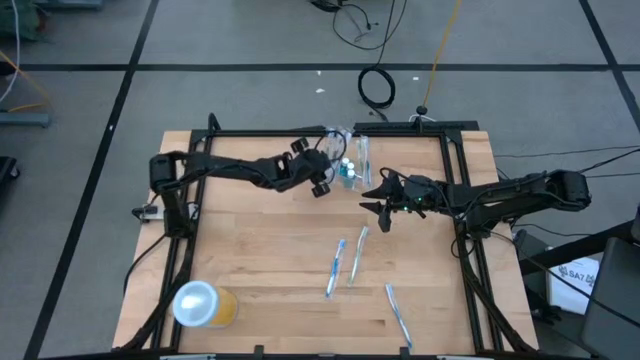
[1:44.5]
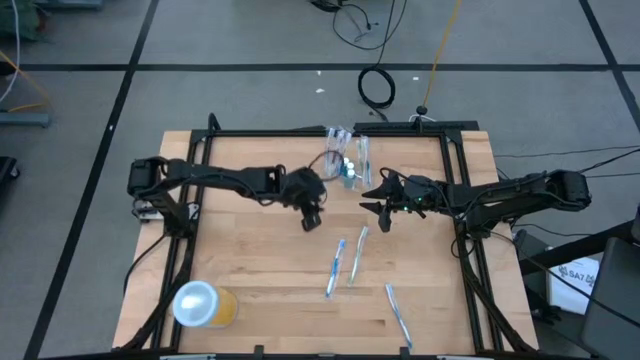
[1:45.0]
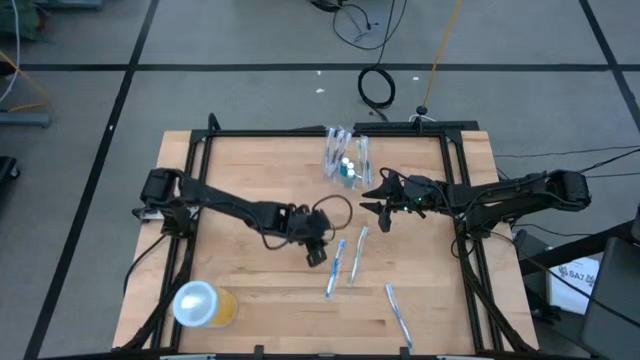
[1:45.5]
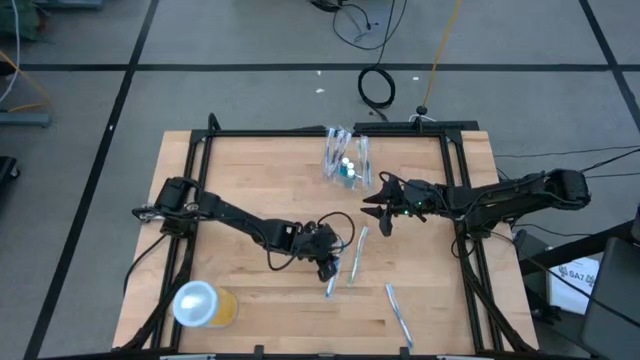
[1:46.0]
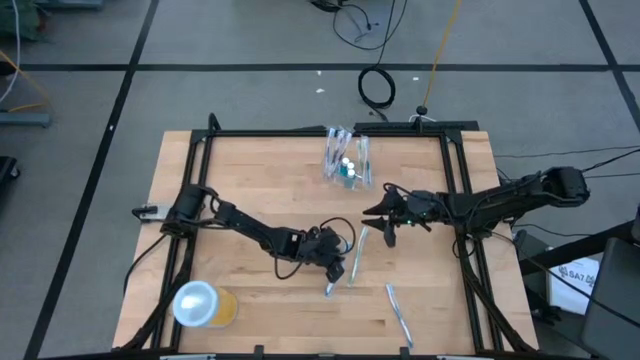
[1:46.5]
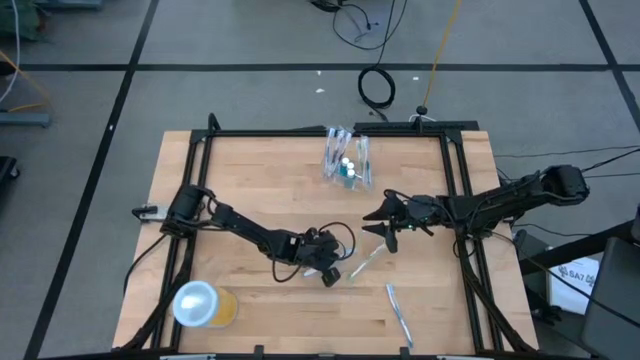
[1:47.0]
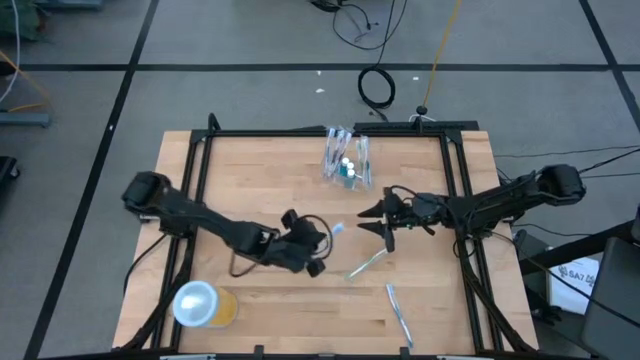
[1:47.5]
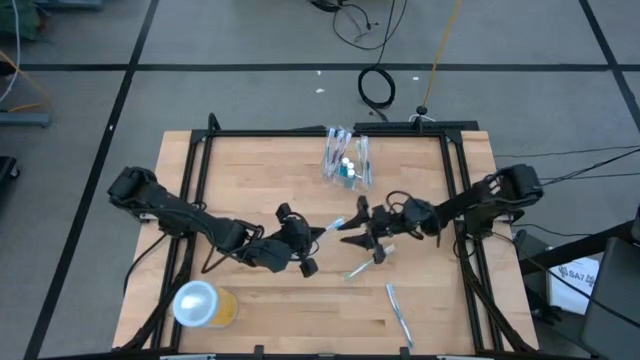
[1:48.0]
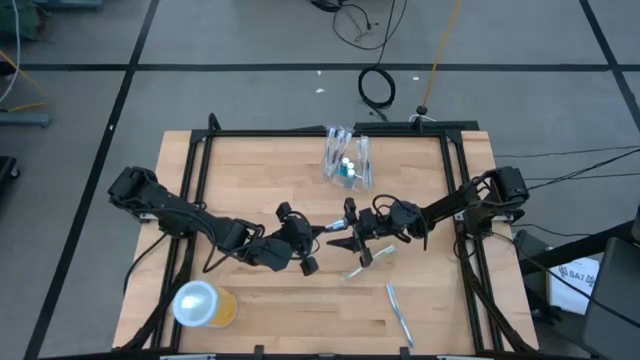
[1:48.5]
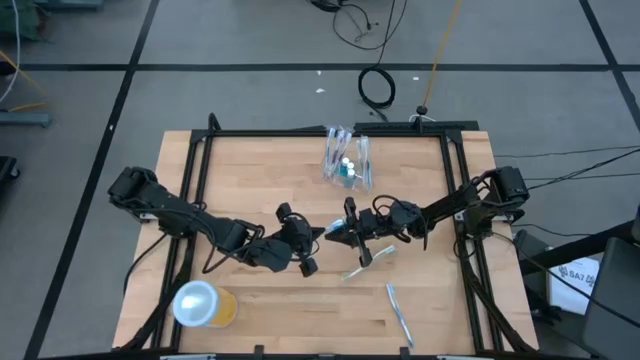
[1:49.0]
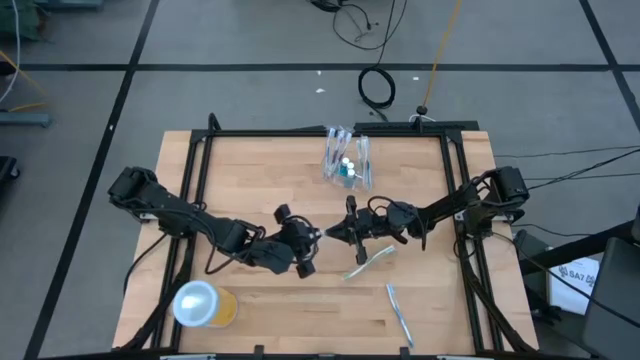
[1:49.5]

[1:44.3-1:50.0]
Task: Pick & Place toothbrushing station
Put the blue toothbrush into the transparent organizer

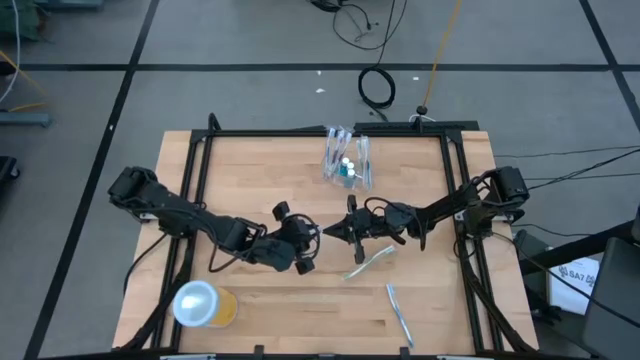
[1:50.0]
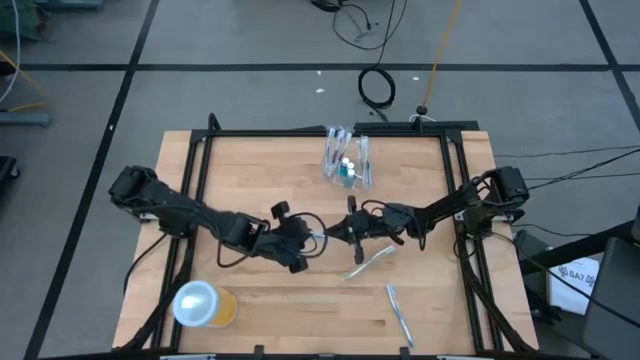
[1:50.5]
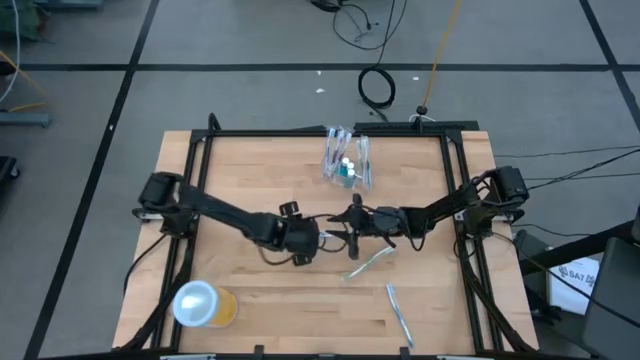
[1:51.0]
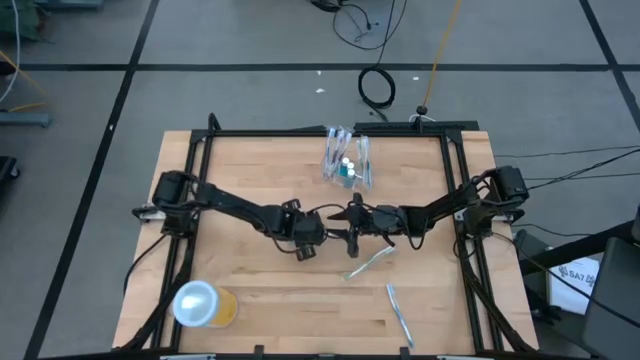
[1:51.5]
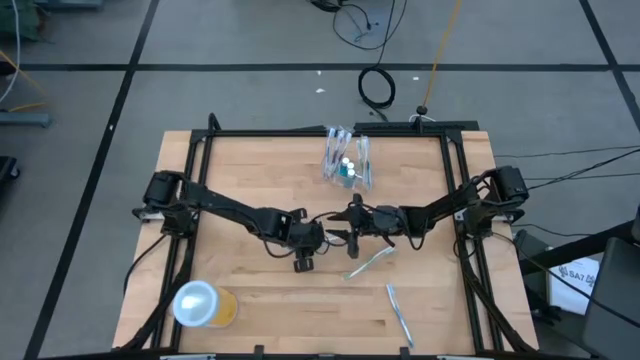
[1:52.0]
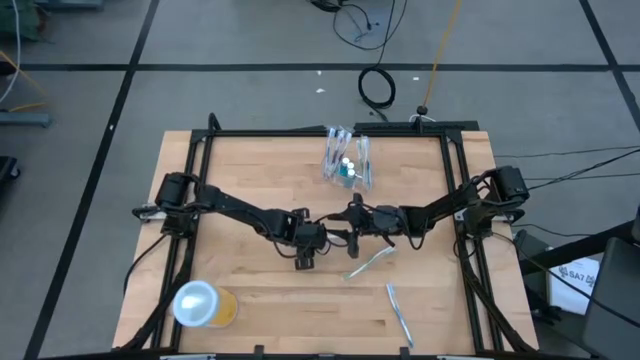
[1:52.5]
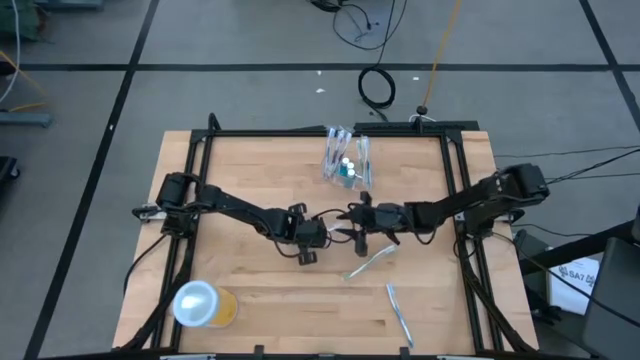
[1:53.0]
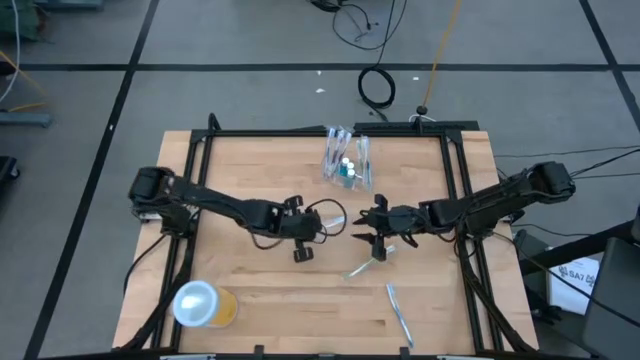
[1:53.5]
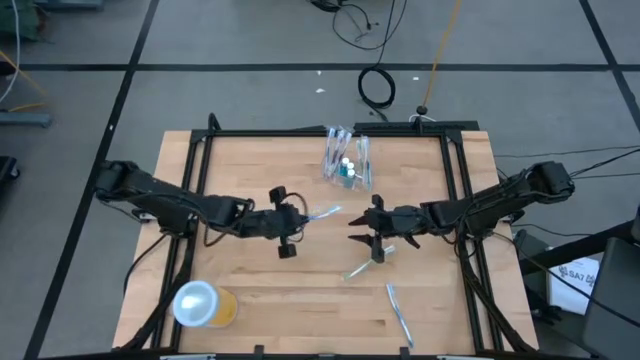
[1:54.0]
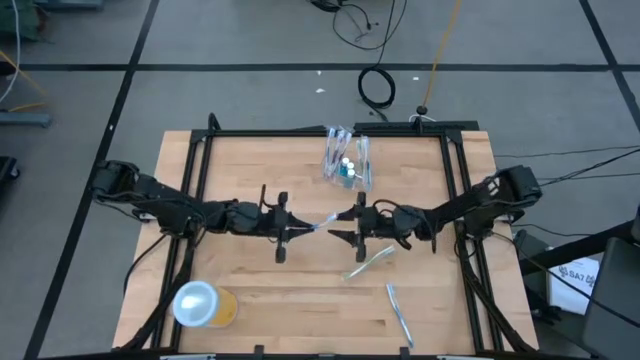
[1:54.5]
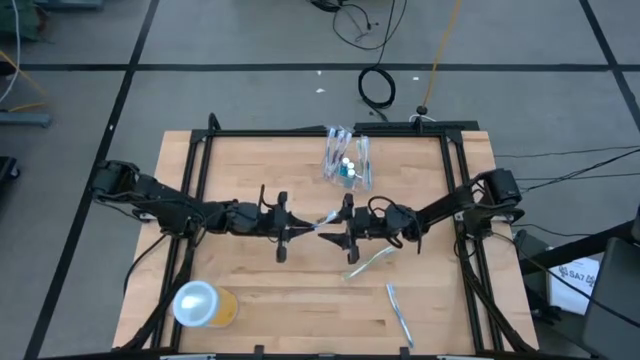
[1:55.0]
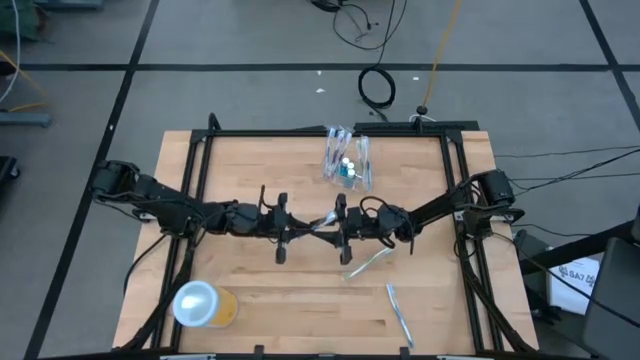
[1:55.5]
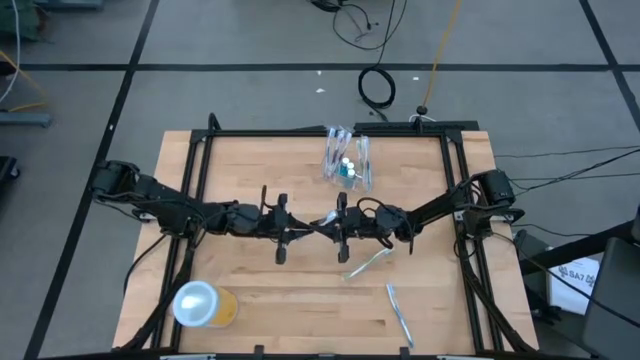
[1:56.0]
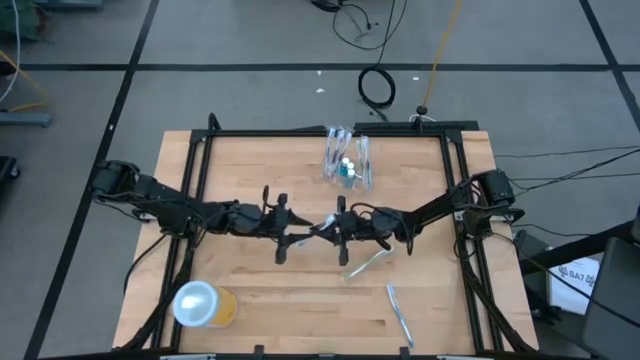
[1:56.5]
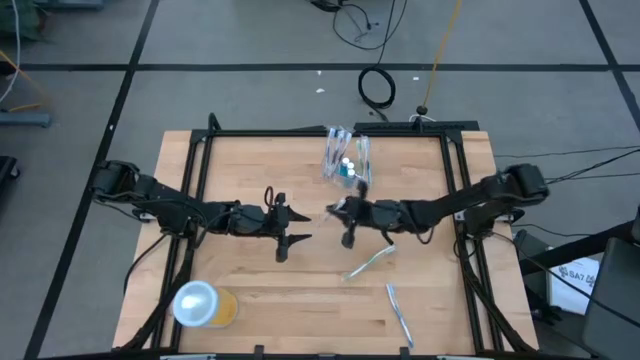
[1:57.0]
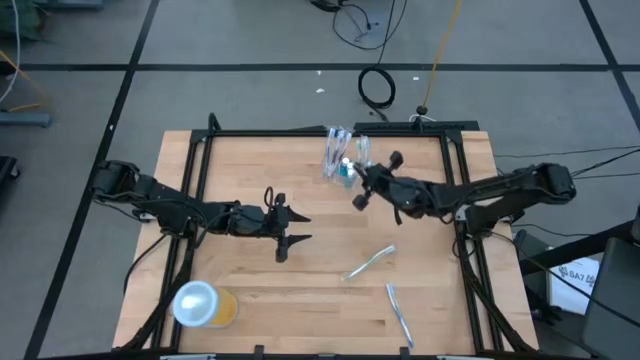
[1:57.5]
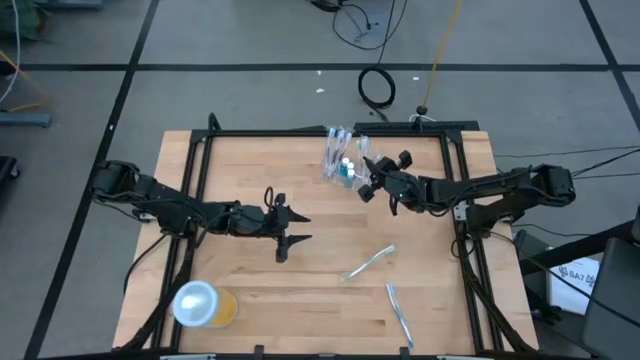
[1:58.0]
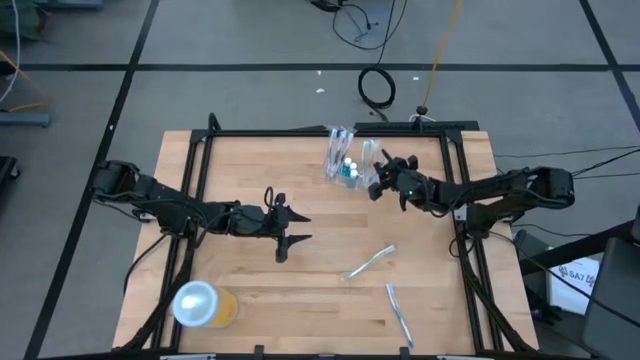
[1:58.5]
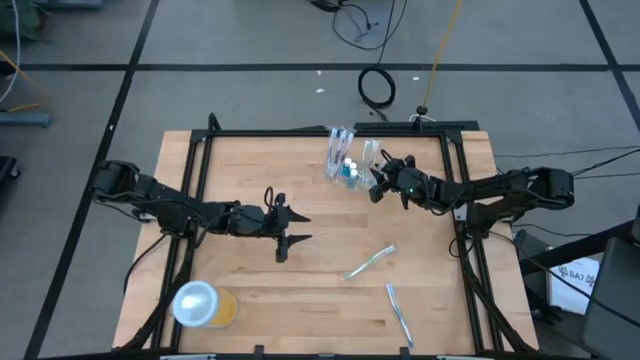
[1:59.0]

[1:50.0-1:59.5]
Put the blue toothbrush into the transparent organizer
